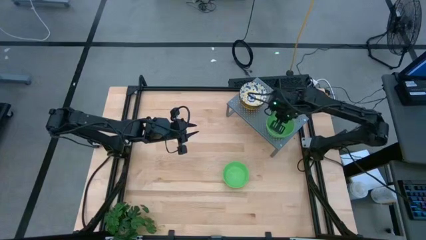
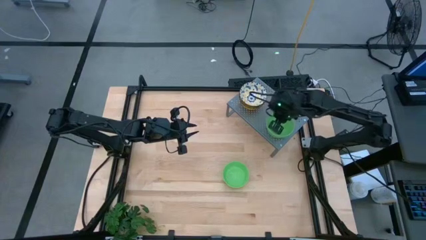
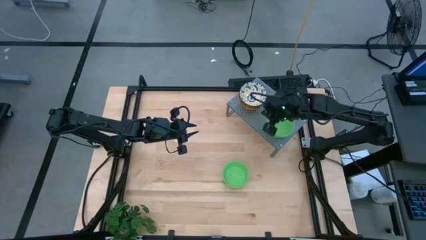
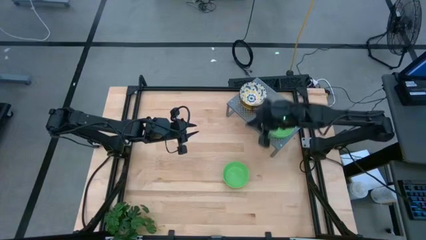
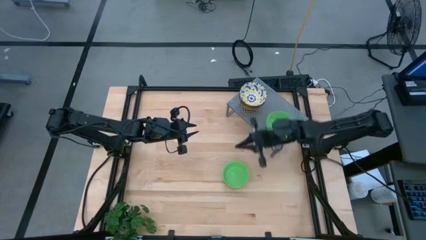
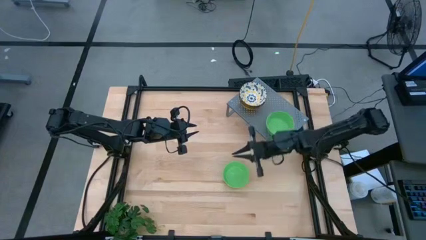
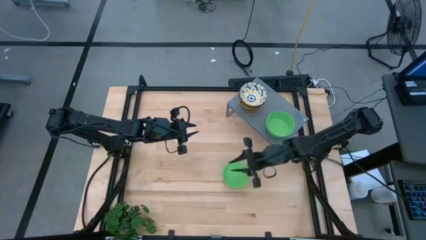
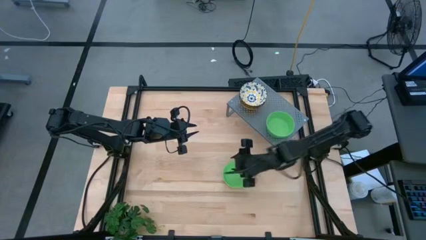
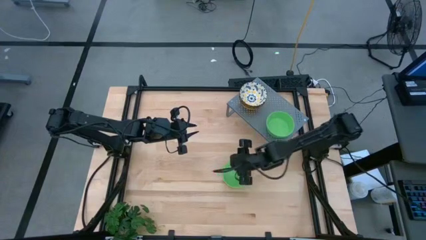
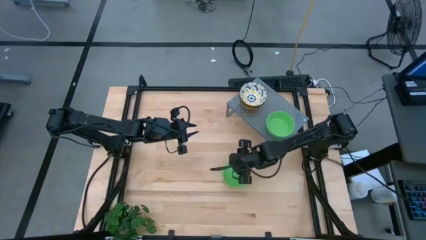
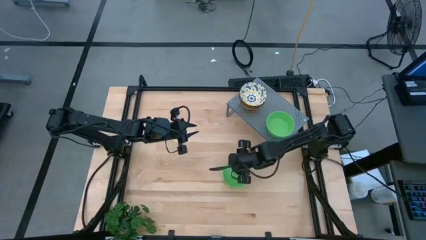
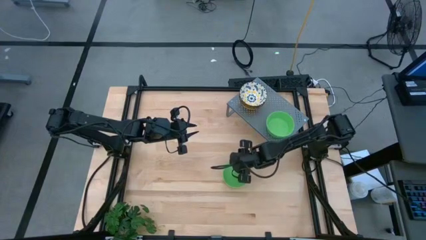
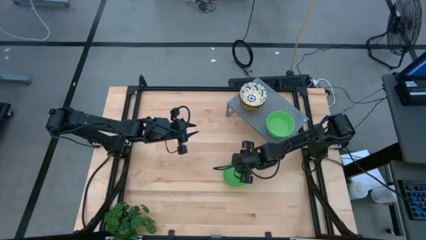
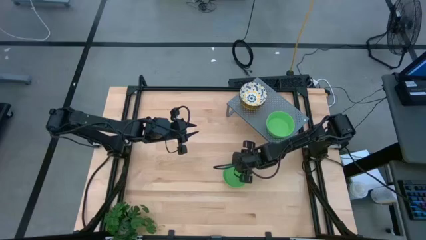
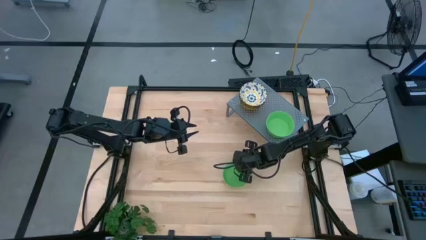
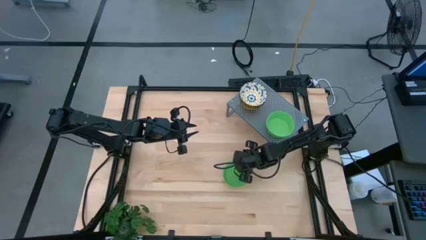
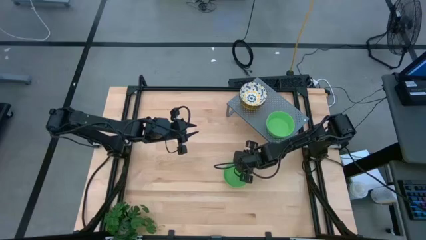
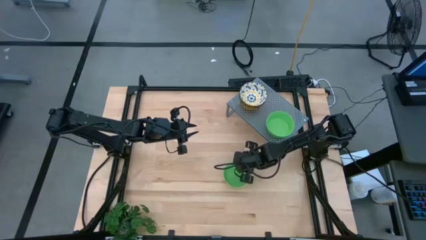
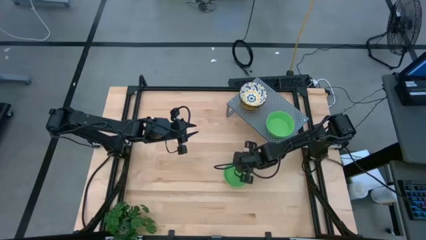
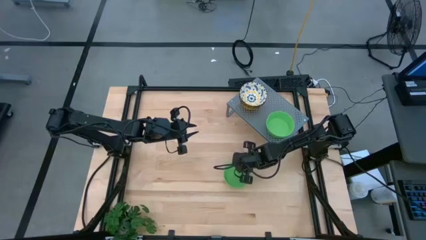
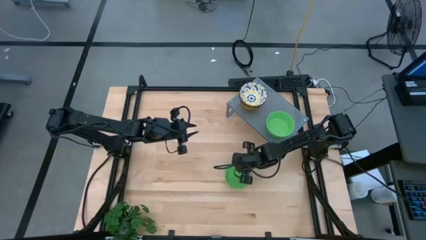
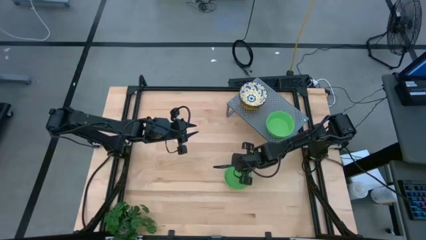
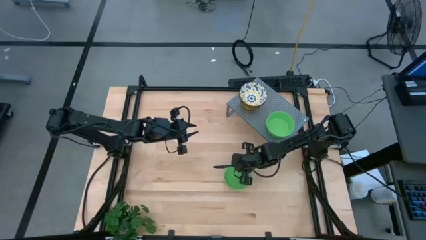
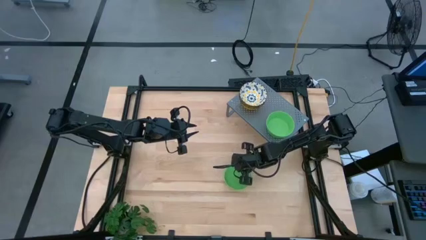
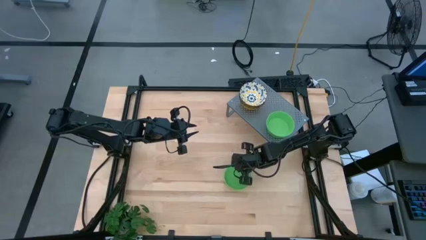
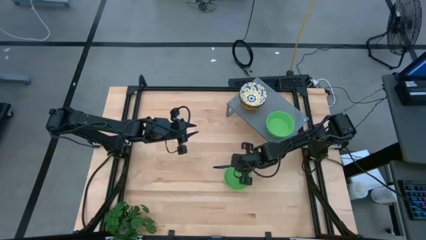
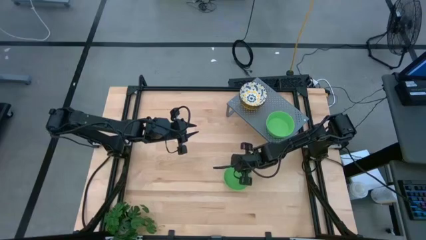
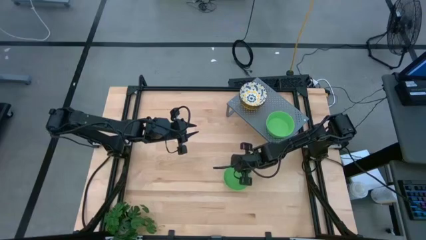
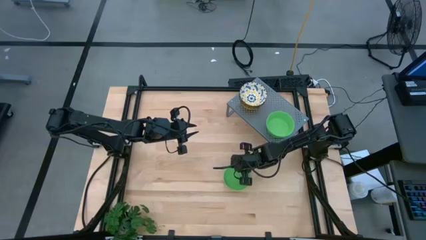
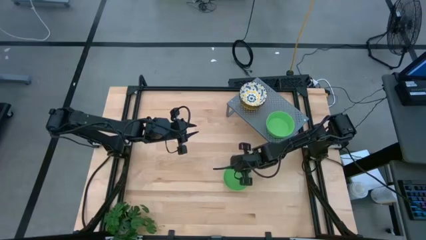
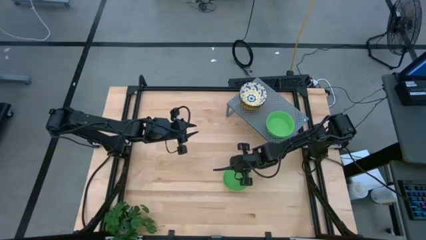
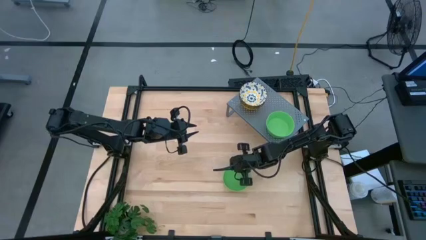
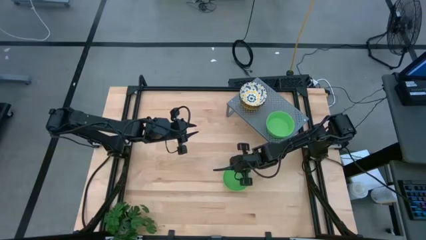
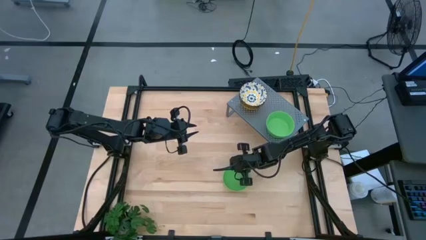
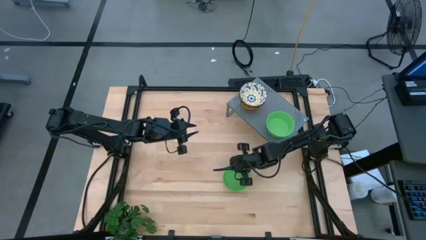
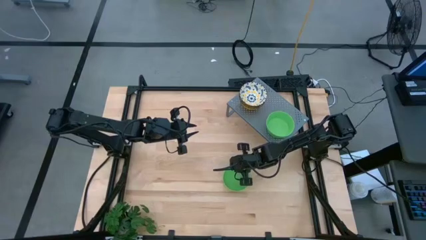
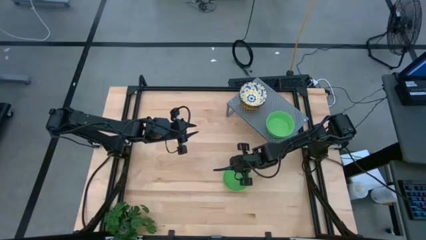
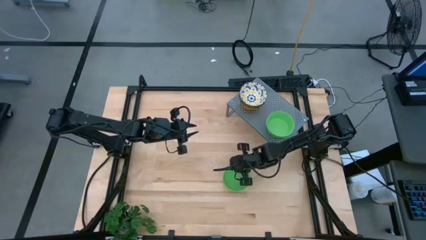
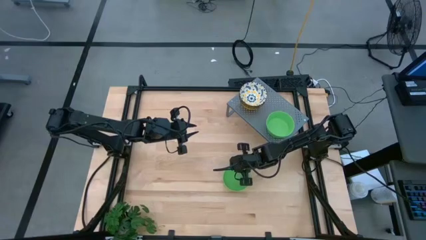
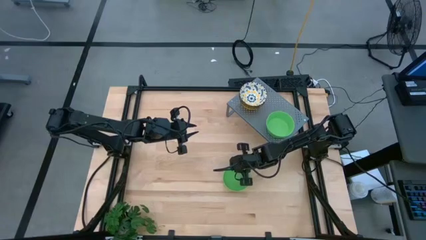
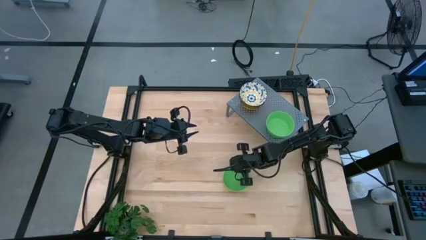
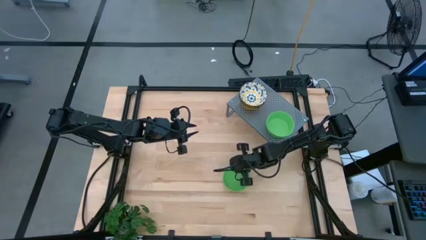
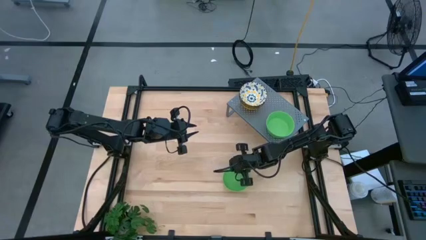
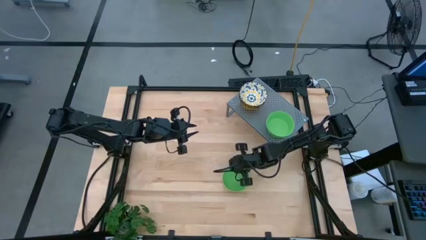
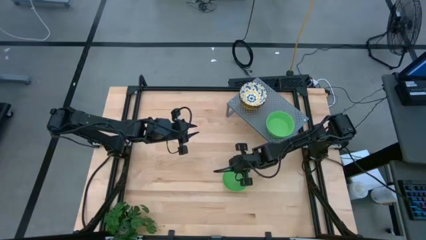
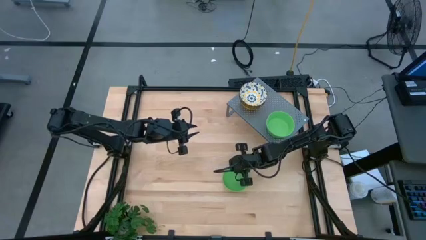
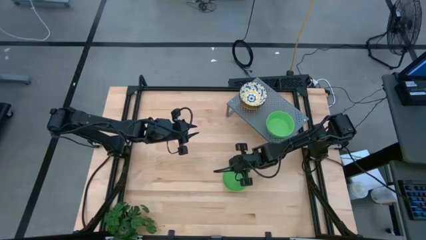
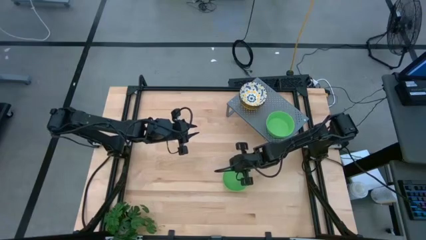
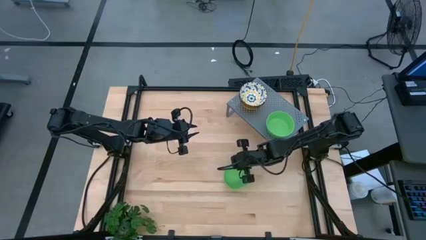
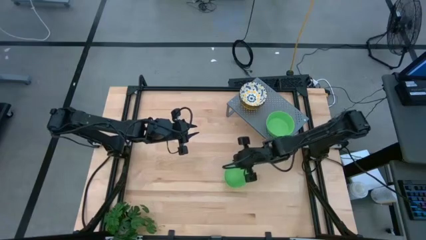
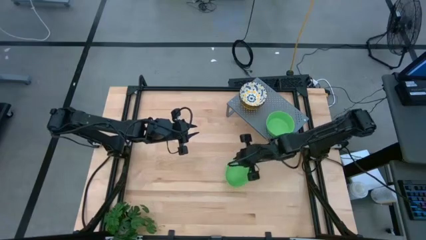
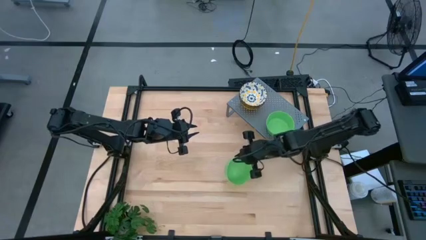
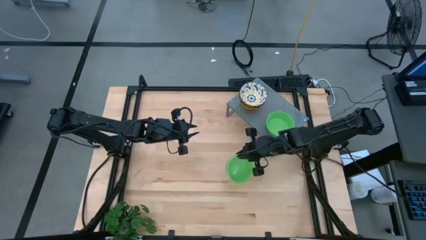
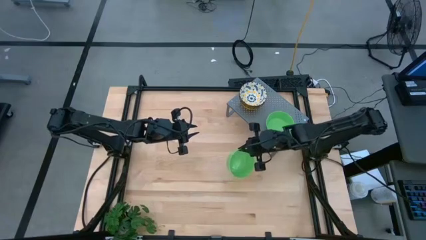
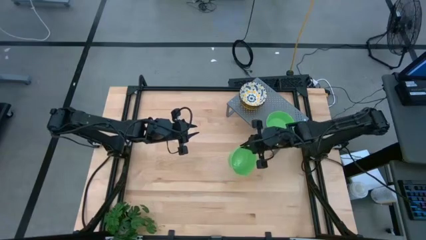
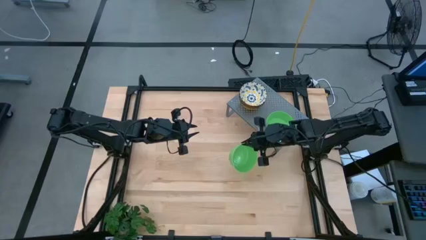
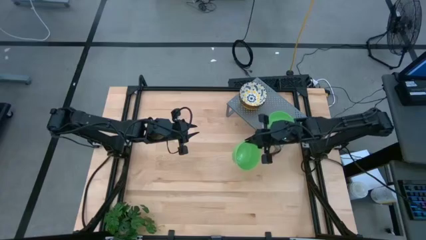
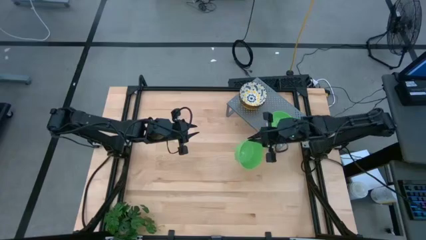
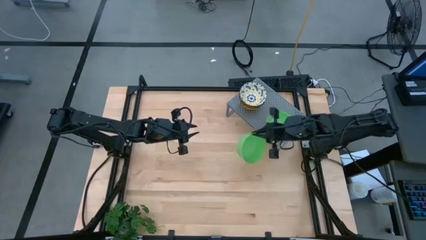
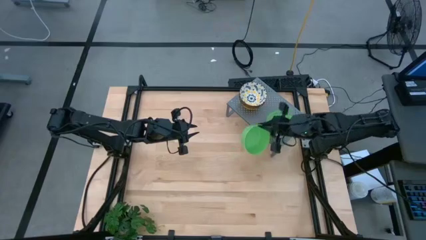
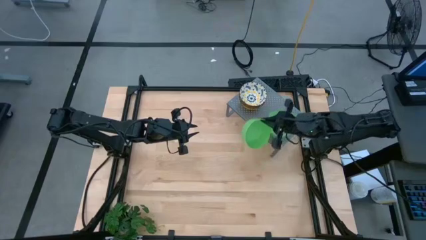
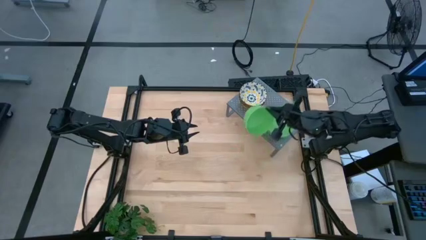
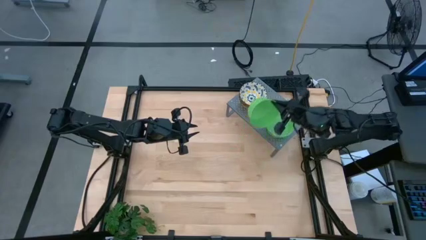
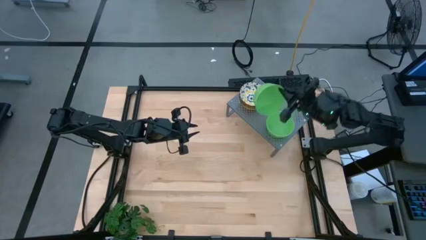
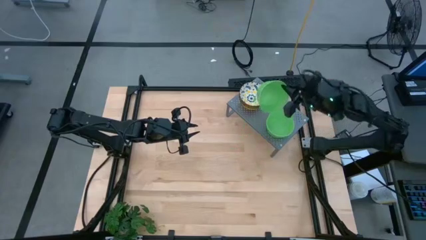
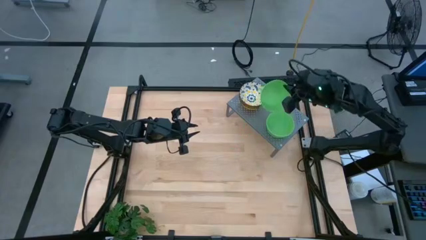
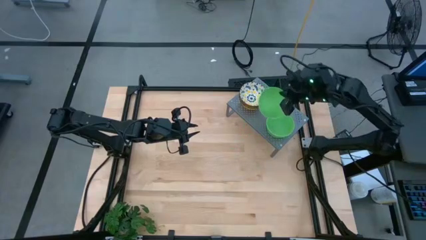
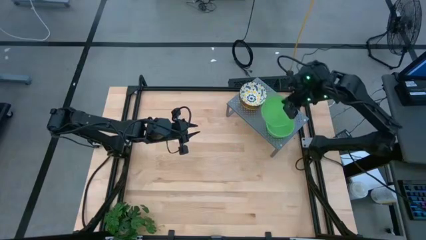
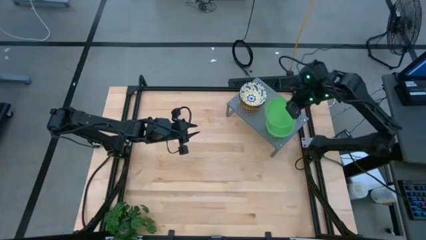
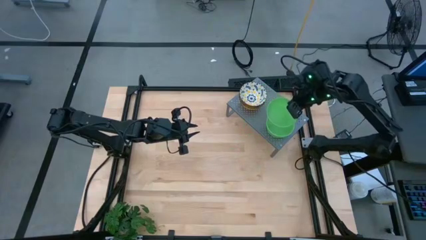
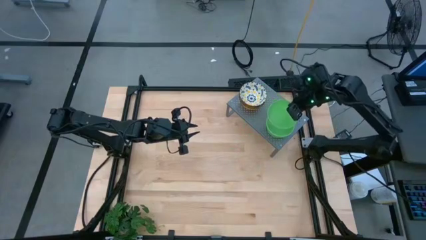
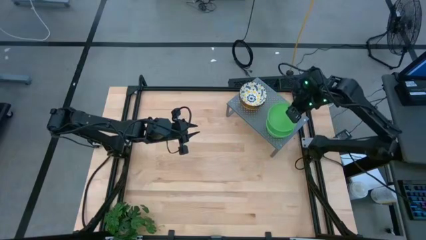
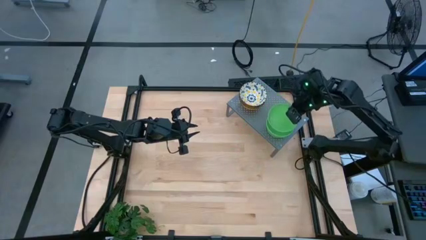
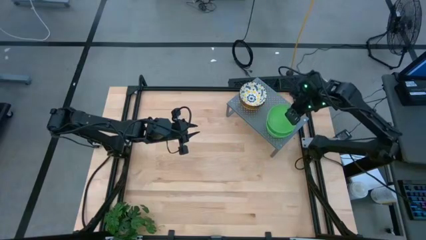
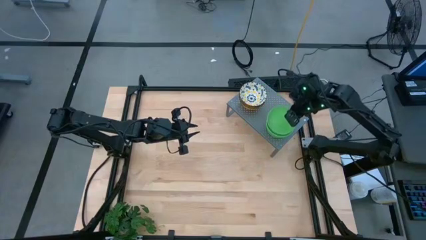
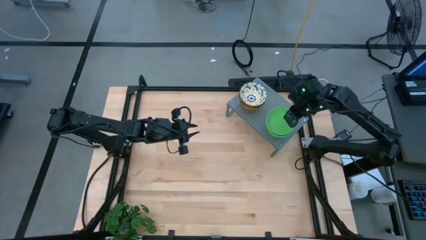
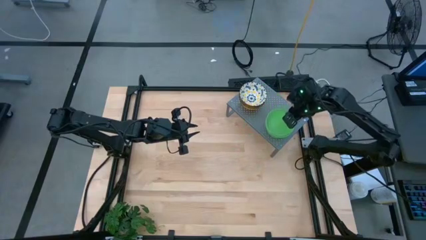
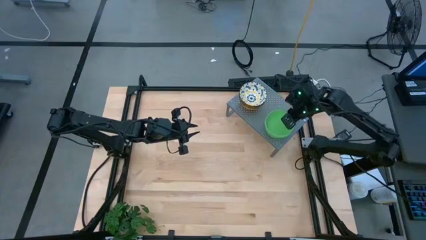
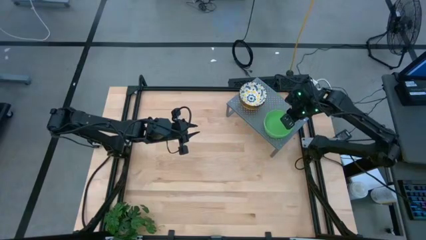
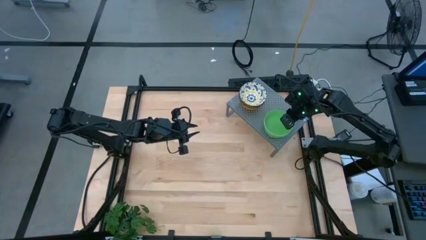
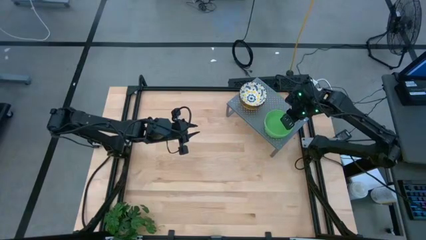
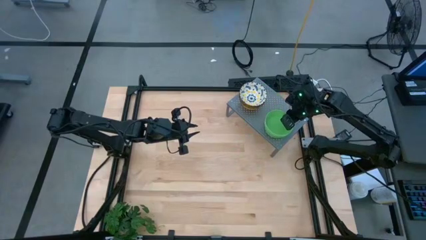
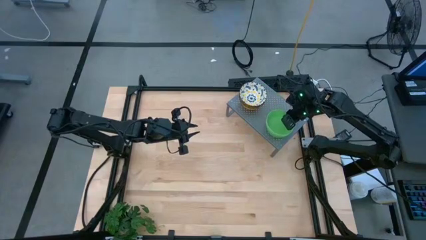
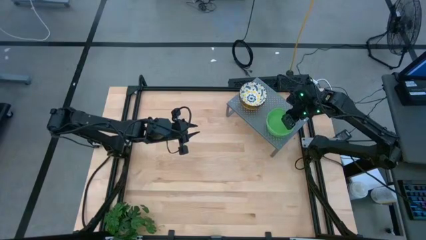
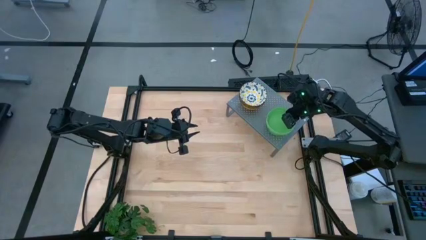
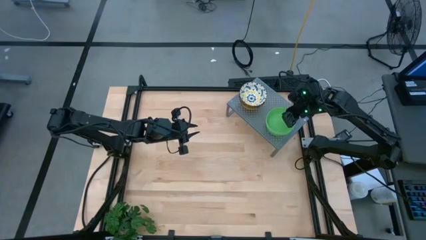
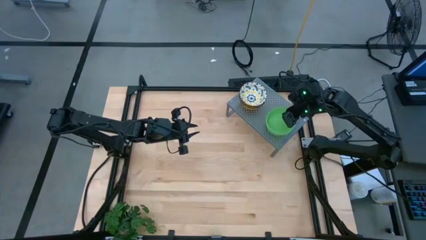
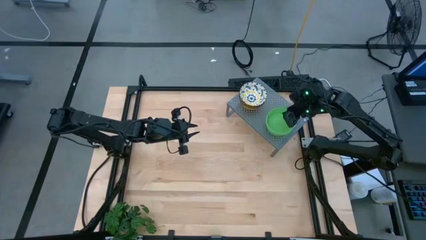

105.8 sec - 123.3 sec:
Task: Pick & Place Mini bowls
Stack the green bowl on the stacked green bowl on the shelf
